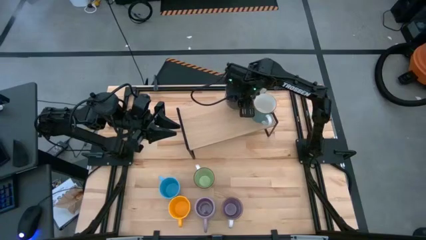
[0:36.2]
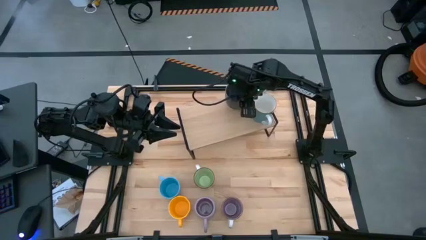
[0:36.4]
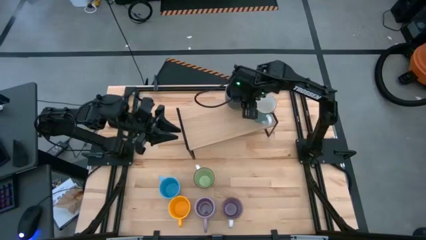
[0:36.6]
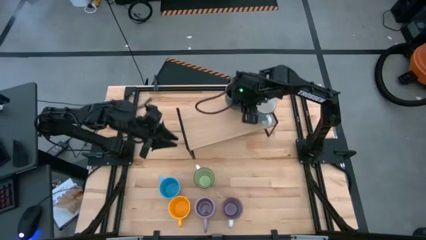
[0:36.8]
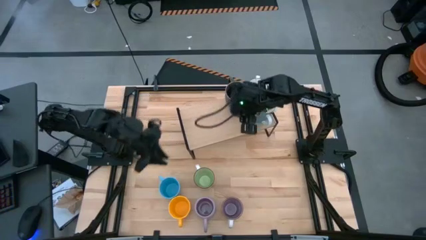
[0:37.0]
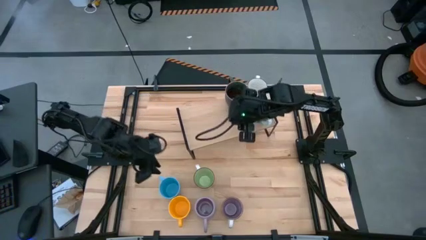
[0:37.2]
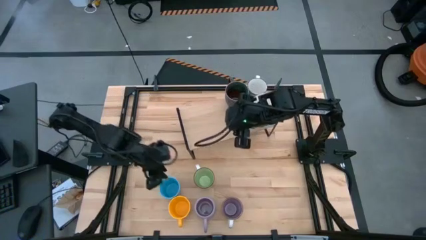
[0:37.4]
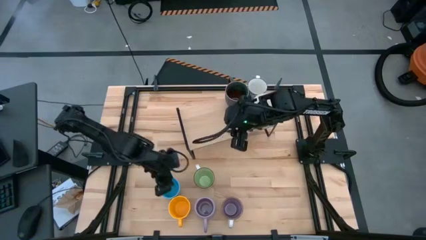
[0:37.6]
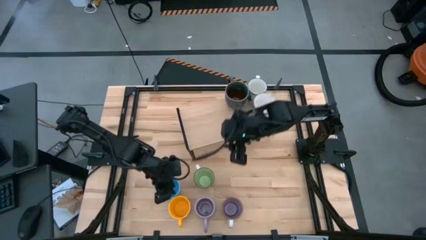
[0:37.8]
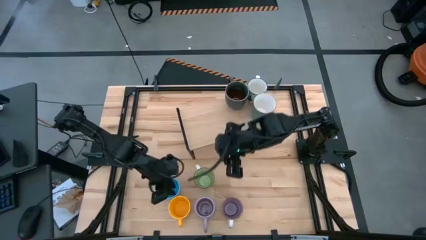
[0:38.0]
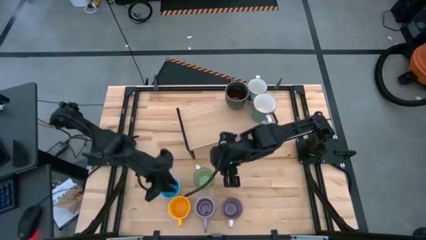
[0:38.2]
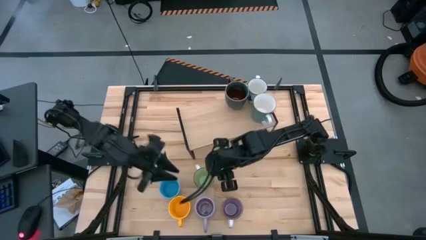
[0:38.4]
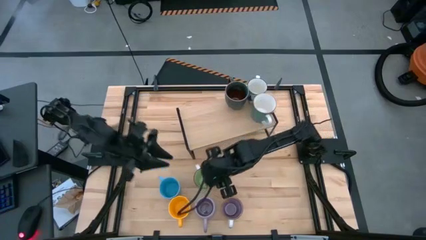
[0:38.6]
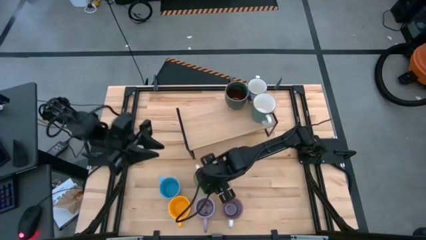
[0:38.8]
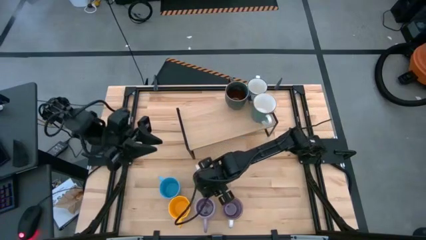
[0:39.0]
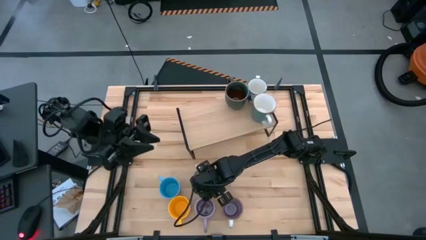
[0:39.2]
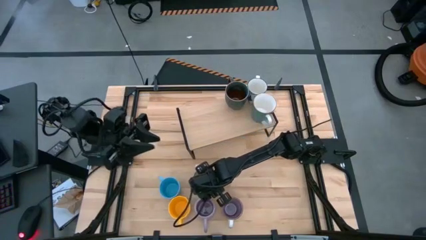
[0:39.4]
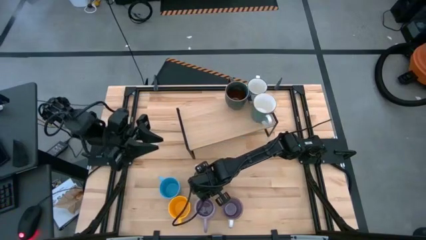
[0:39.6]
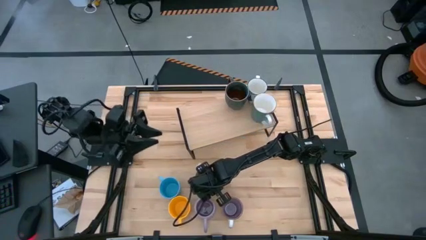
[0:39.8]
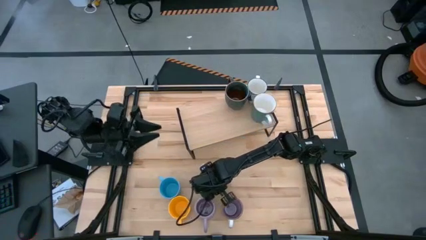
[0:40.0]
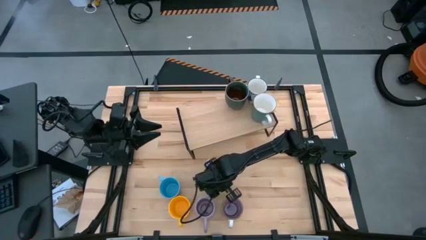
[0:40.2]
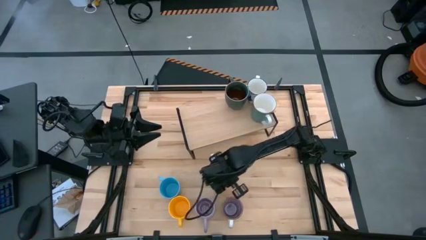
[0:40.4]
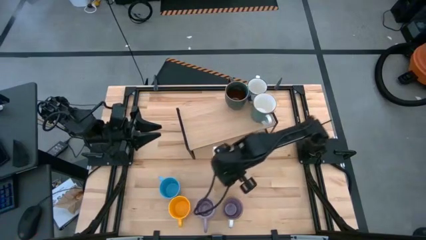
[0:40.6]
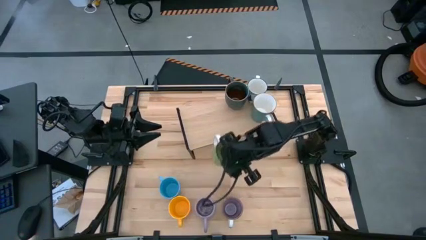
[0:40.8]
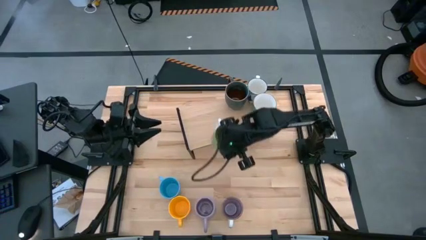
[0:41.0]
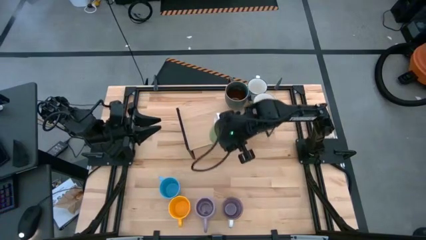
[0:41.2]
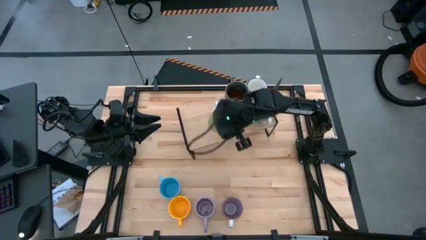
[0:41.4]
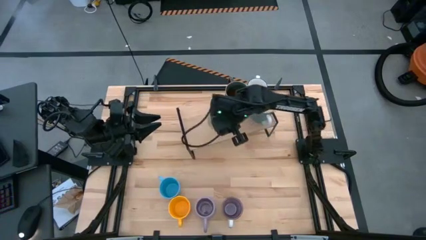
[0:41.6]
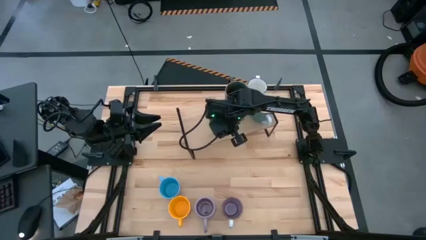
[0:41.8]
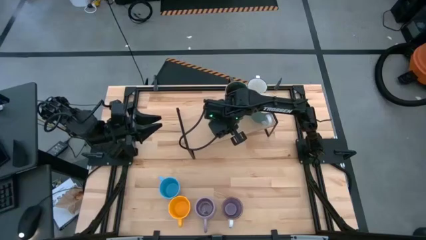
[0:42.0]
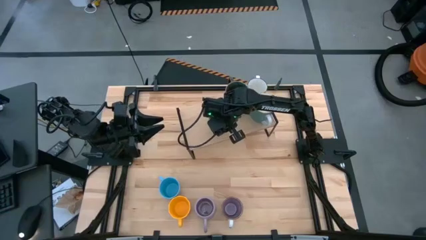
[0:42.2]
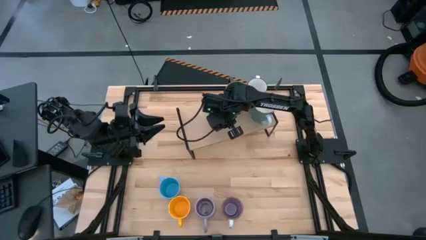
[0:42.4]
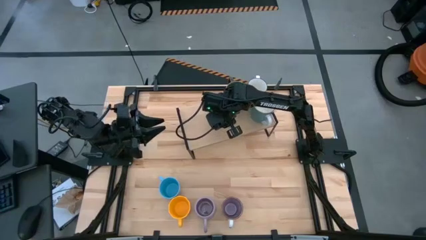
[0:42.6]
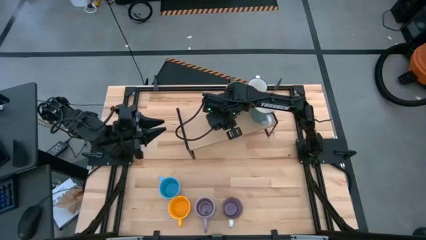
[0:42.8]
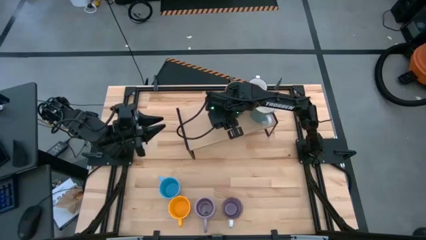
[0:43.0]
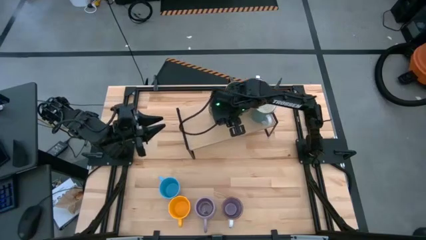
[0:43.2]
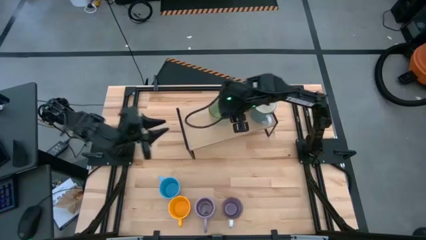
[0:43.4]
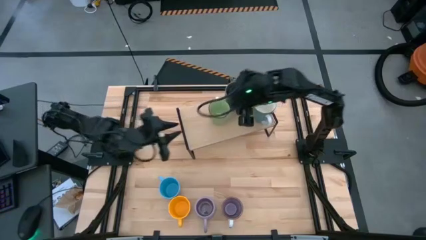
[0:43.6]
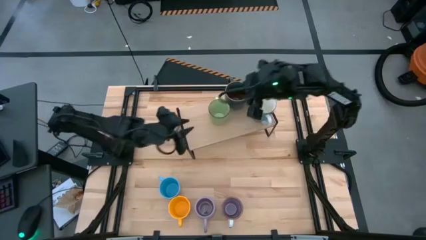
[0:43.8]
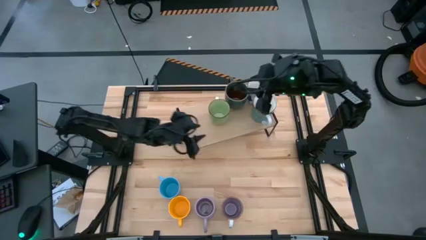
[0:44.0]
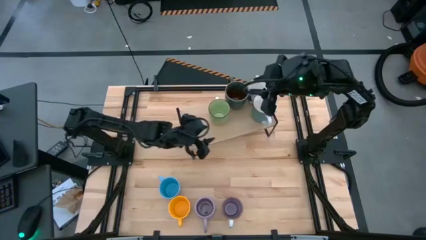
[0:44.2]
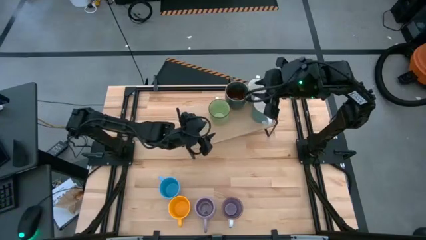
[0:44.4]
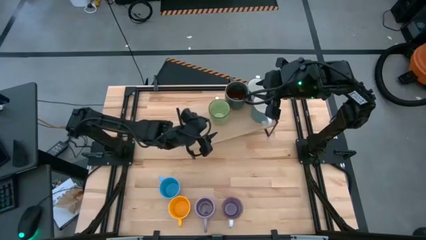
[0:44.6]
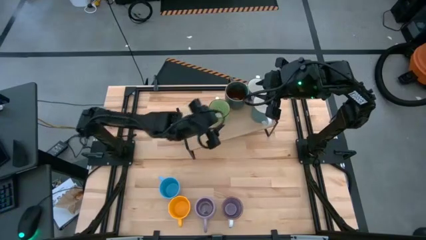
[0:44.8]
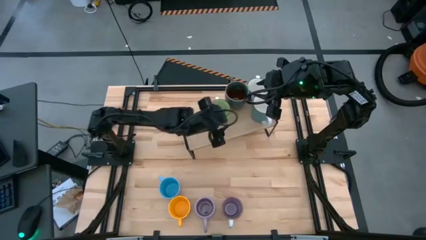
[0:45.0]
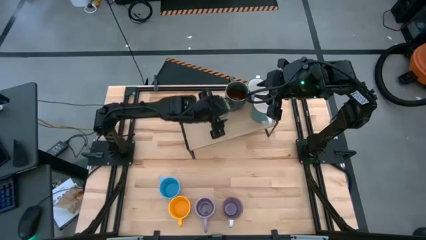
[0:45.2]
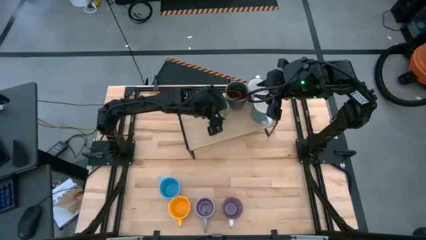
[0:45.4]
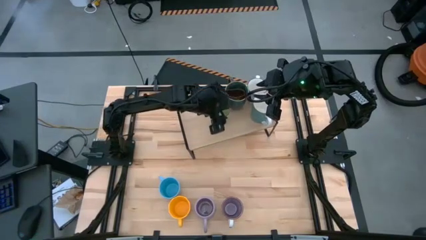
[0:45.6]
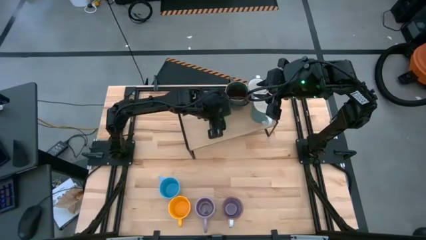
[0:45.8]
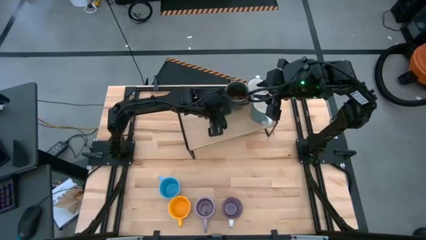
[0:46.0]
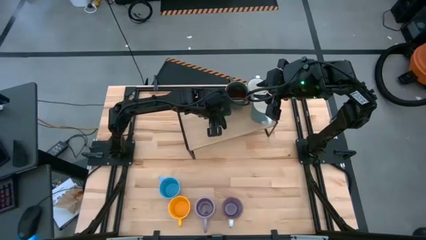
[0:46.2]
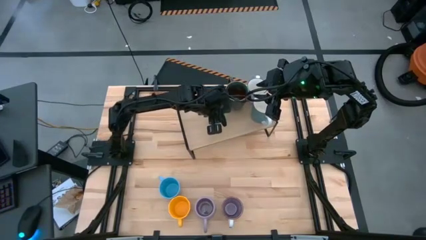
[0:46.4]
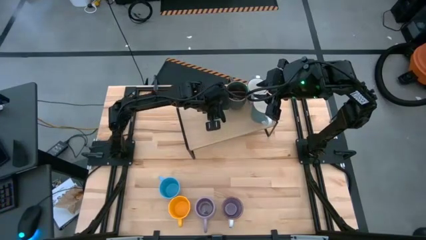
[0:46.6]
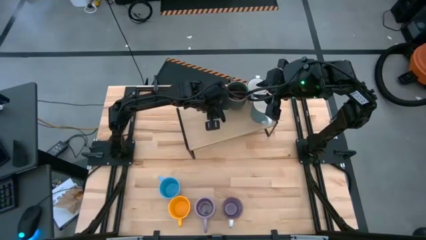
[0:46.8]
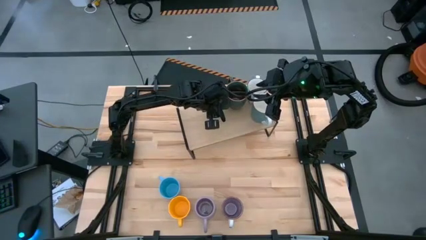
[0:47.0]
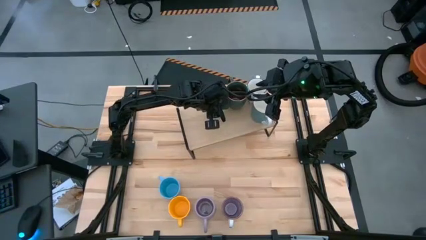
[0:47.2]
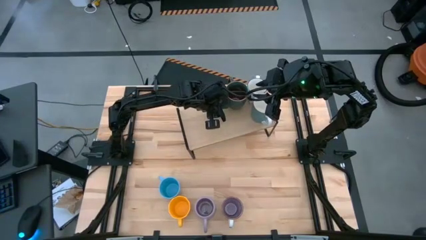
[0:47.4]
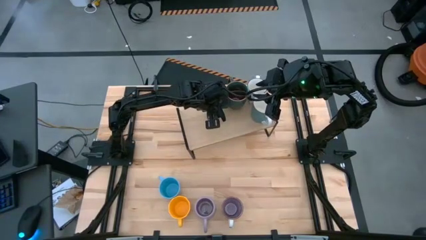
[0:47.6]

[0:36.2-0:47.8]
Task: Place coffee mugs
Put the green mug on the shelf

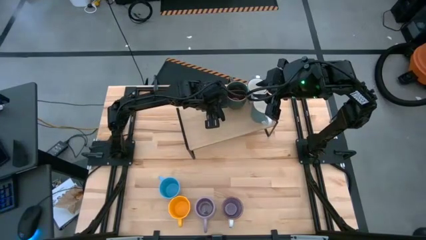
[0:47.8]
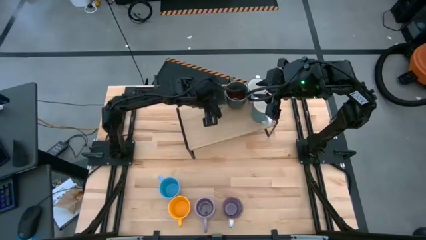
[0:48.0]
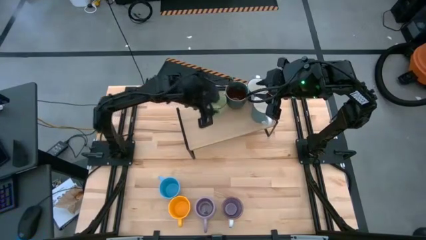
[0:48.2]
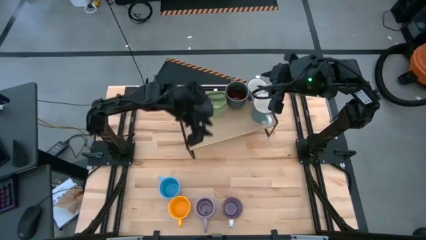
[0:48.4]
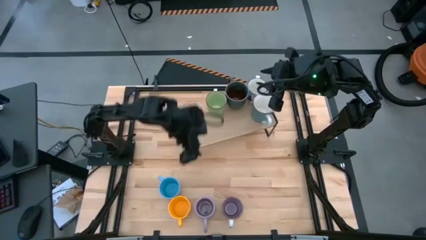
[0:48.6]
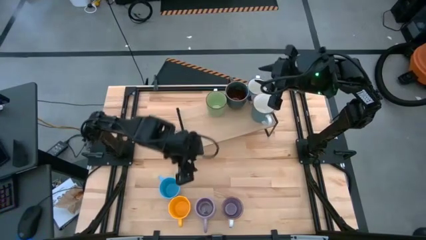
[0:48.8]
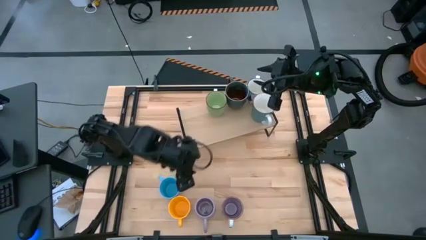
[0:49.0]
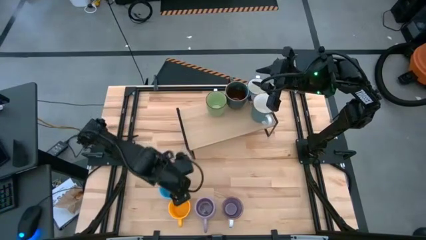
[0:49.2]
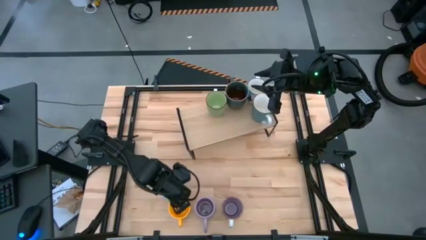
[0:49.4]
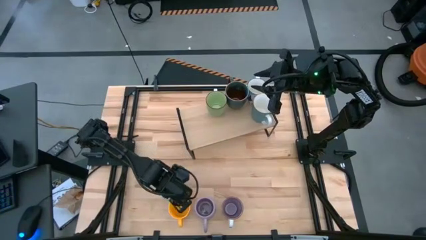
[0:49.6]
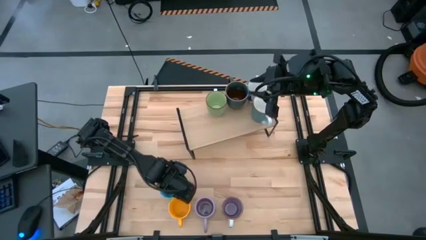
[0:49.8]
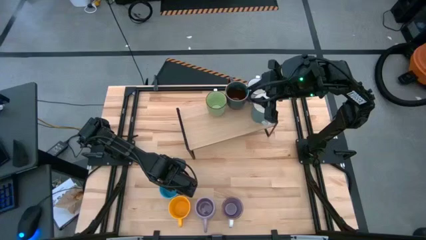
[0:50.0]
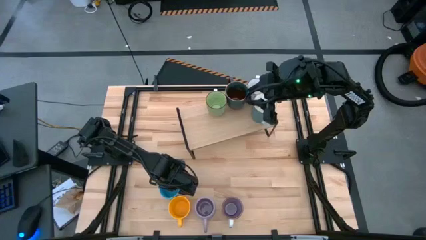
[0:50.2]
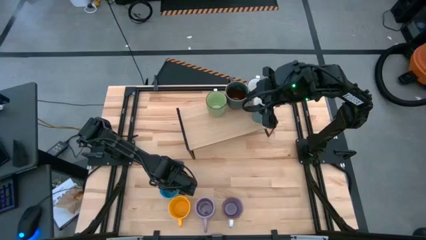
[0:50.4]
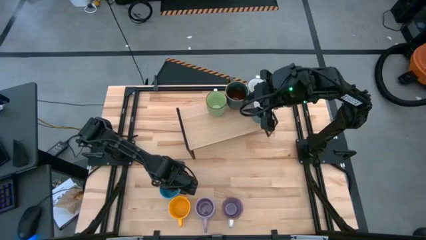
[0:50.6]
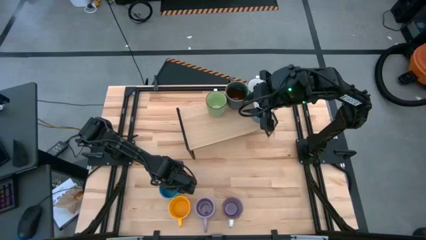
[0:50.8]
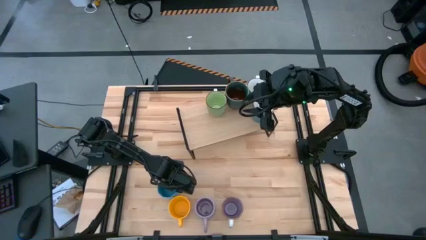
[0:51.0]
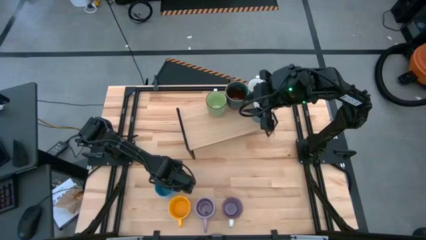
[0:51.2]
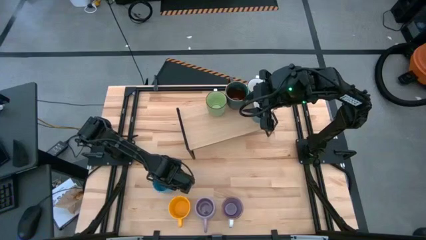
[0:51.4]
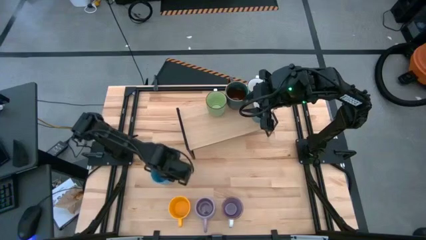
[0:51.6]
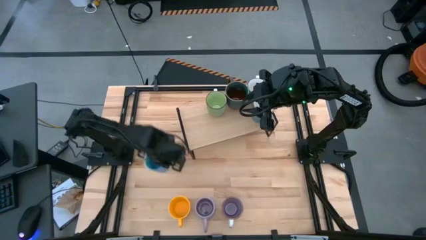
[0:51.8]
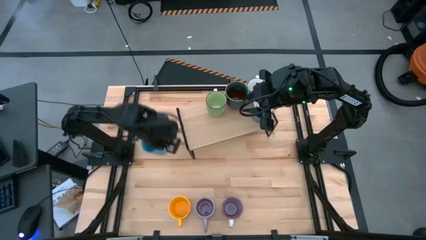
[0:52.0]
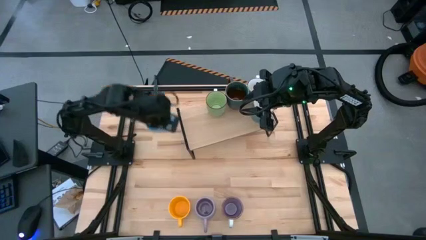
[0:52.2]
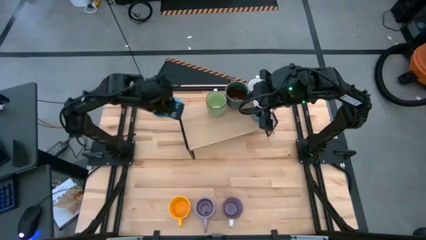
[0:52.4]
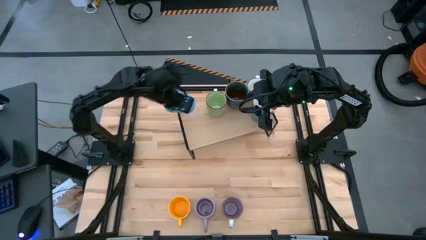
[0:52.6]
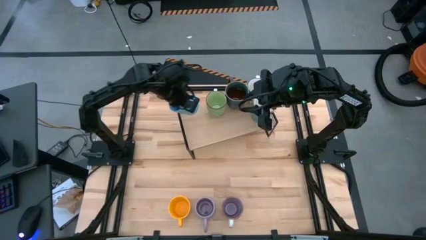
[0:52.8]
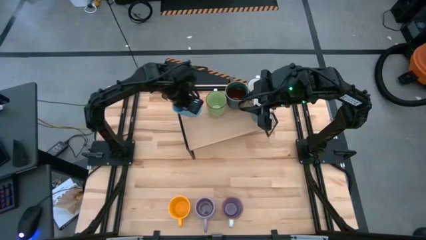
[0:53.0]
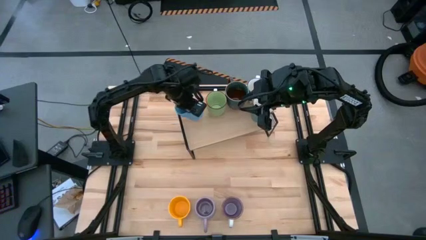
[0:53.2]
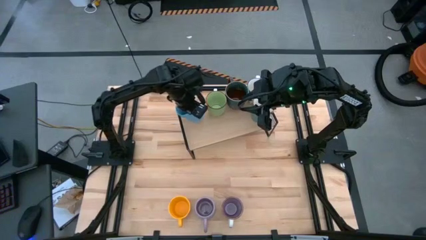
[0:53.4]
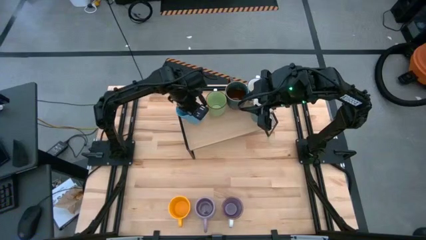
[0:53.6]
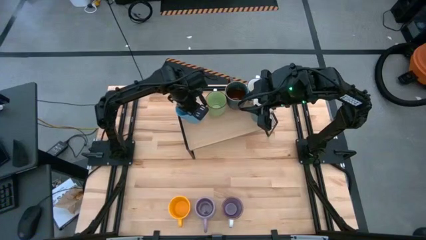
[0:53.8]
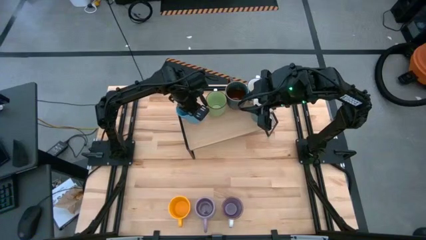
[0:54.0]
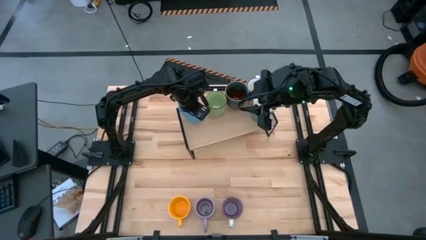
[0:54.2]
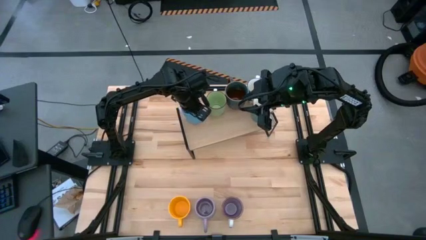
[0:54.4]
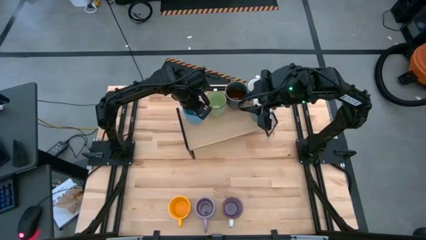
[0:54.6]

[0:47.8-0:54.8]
Put the blue mug on the shelf
